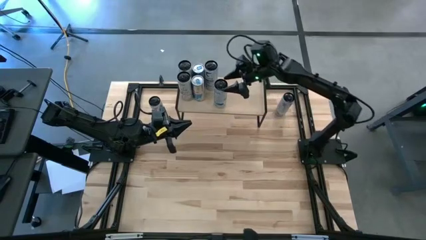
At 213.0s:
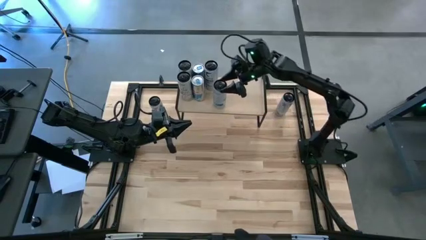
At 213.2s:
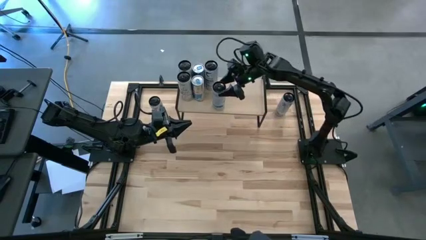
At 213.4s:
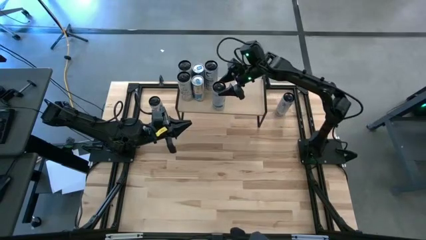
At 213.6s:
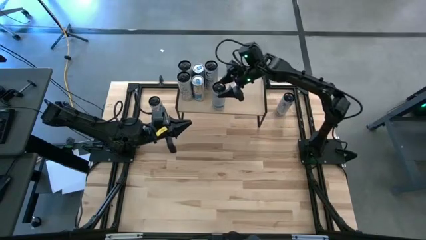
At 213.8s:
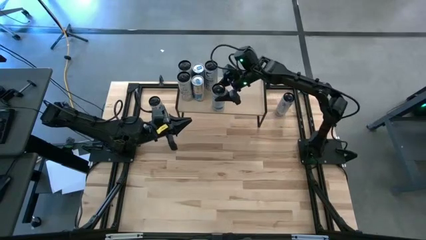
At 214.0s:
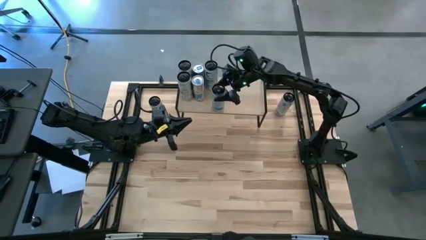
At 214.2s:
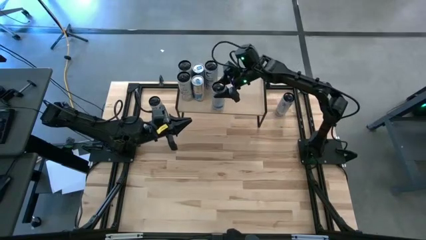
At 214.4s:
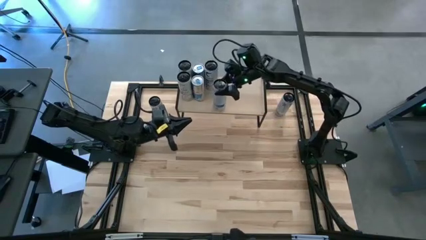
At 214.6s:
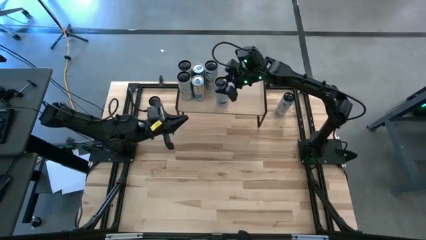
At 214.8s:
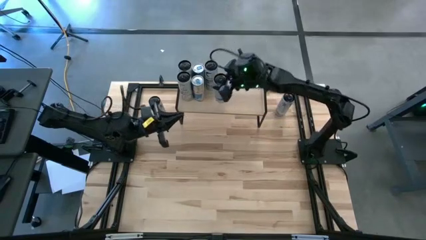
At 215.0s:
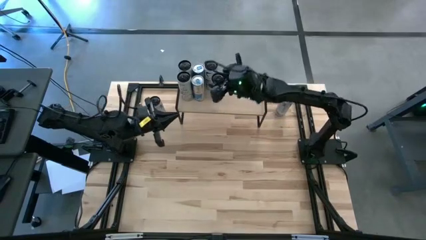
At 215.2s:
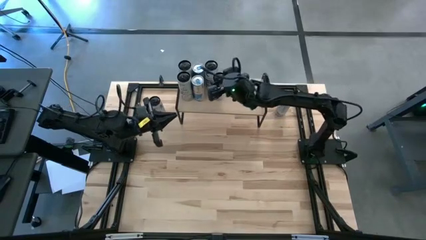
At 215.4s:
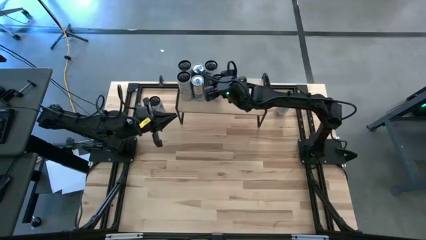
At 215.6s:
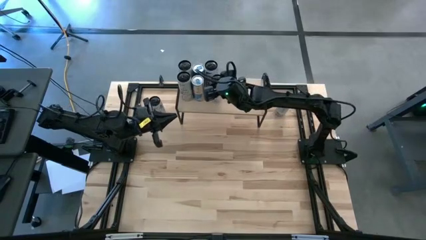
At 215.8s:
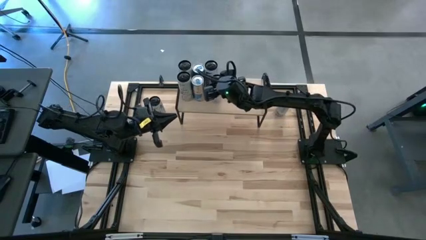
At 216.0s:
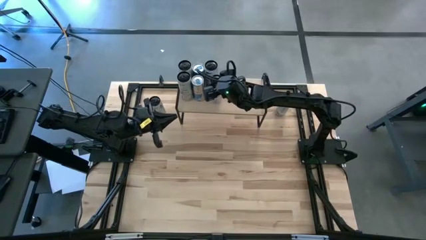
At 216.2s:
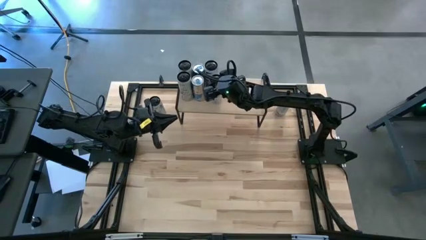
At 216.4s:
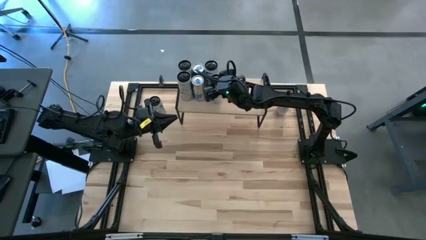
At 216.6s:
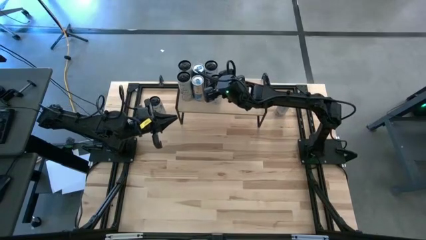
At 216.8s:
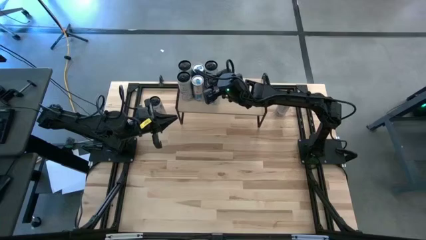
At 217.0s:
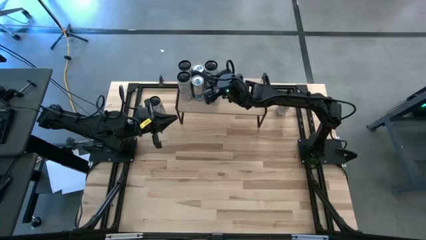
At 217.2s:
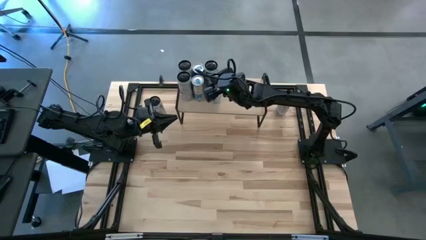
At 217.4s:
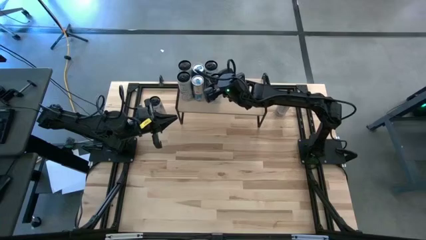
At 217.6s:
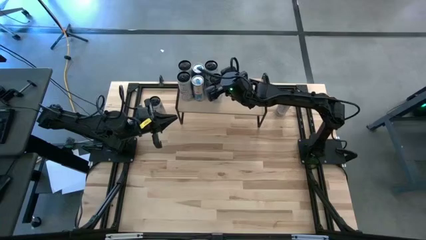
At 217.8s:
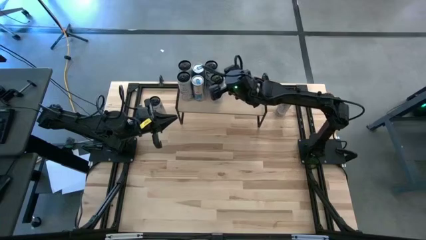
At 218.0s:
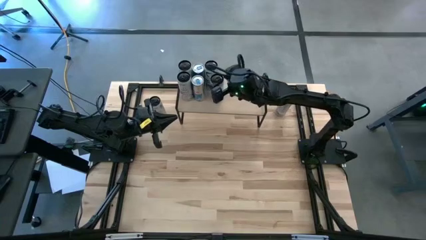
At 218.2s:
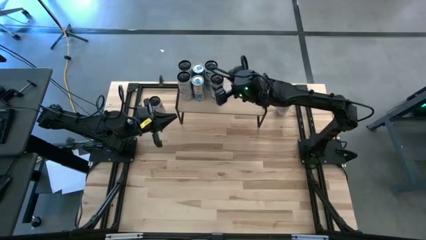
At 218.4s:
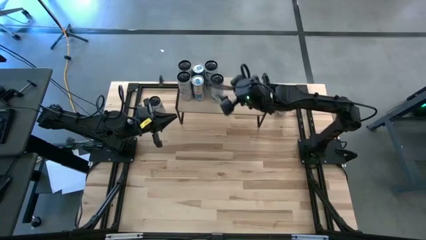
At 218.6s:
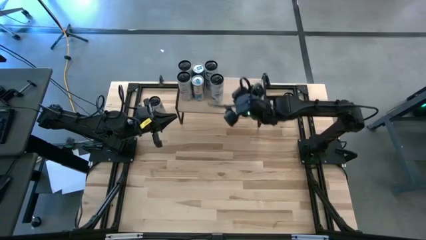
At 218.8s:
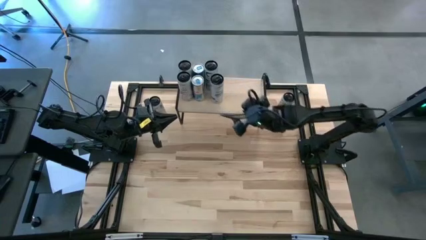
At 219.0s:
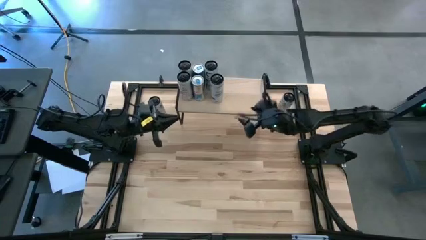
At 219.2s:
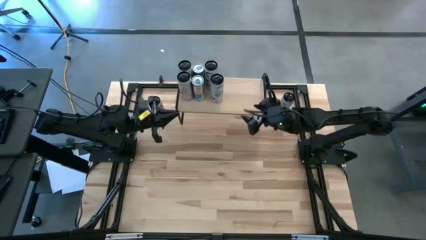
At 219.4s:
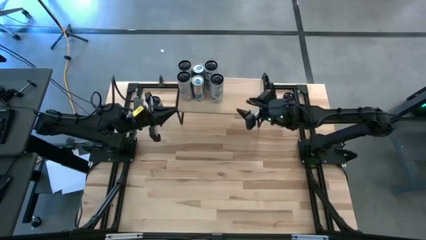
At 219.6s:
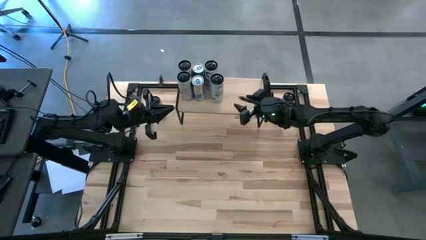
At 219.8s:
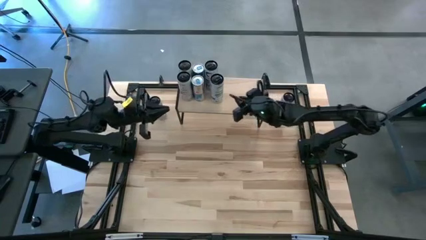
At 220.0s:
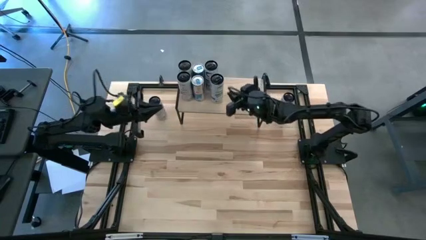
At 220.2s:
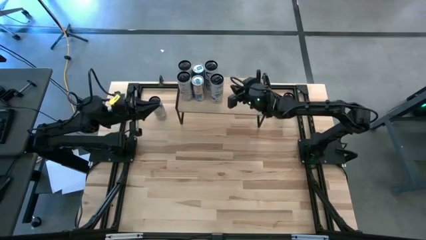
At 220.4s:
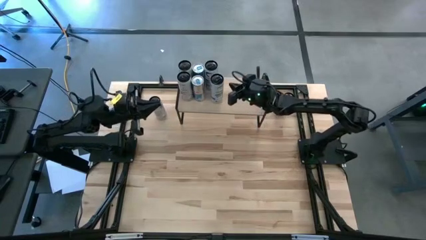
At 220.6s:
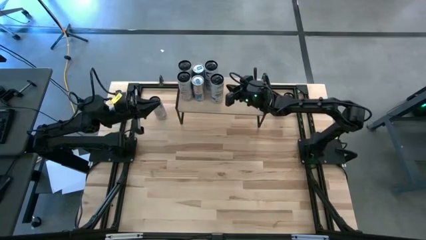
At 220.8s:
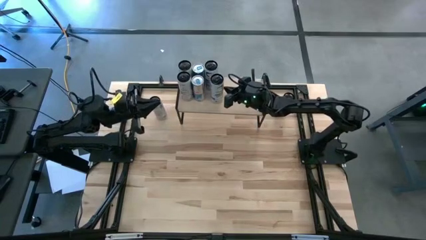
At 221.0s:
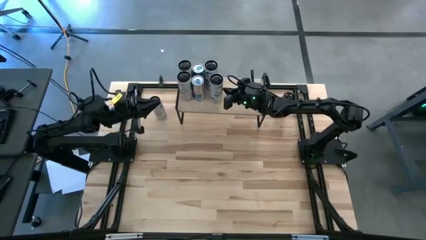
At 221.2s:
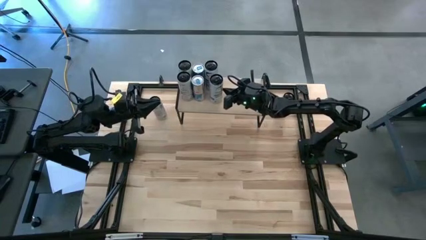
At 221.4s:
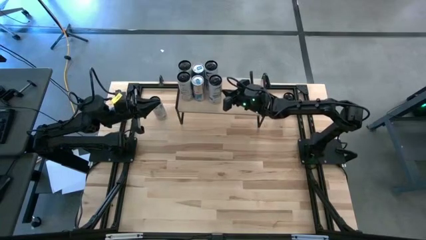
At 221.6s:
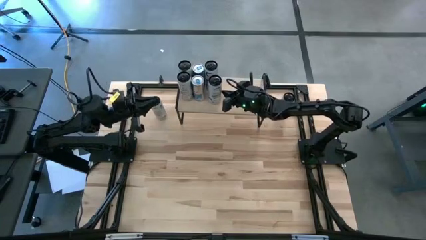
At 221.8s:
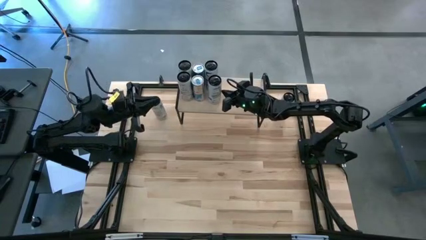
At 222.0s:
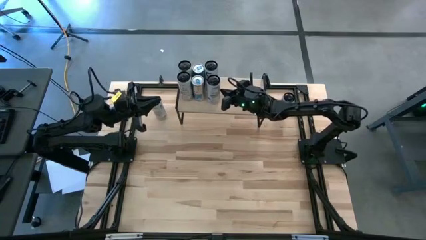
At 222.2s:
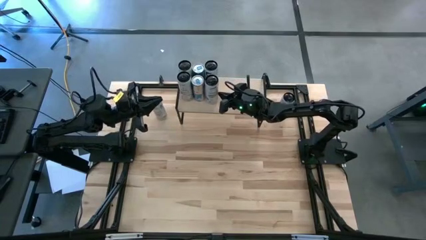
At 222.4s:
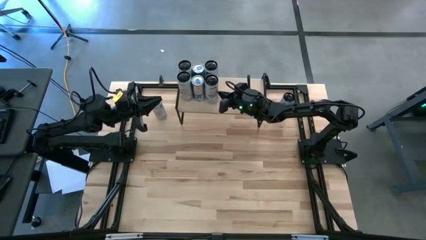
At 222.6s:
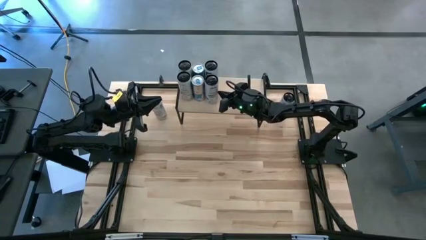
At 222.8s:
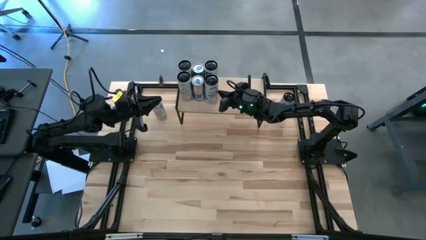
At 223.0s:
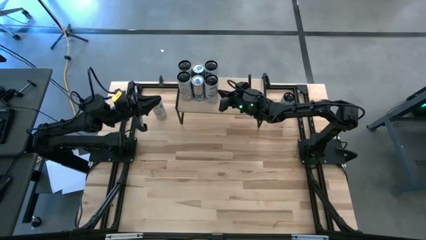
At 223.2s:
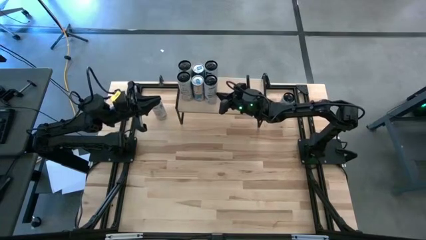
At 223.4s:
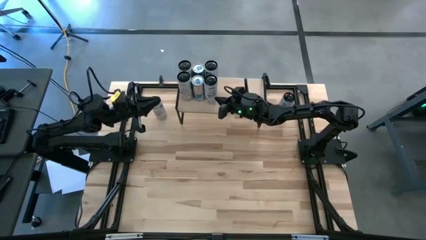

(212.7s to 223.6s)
Task: Place canned beverage on shelf
Put the bottom right black soda can on the shelf
